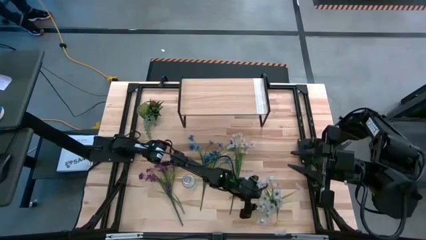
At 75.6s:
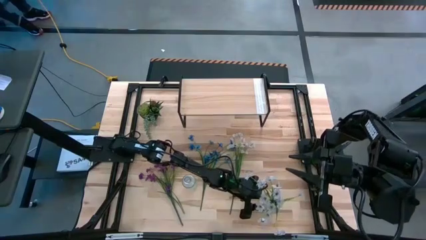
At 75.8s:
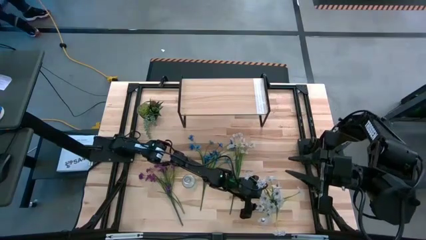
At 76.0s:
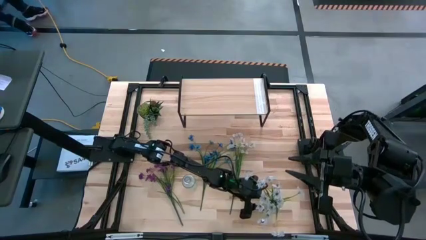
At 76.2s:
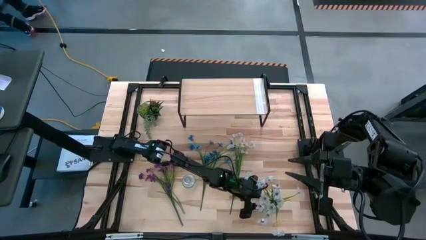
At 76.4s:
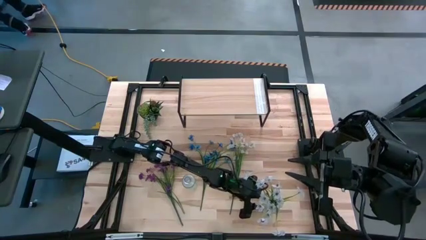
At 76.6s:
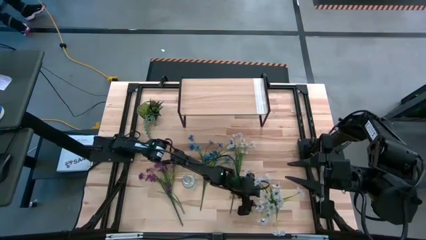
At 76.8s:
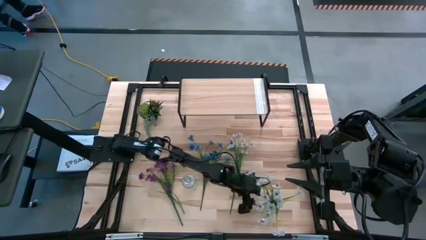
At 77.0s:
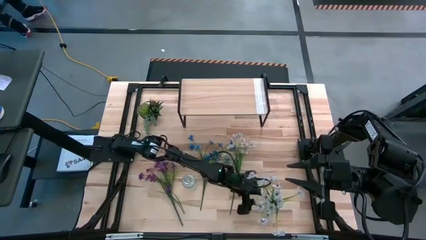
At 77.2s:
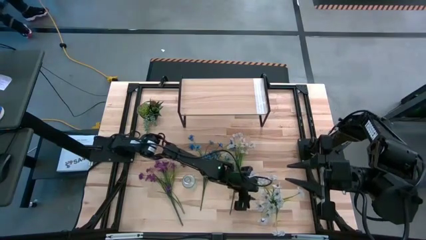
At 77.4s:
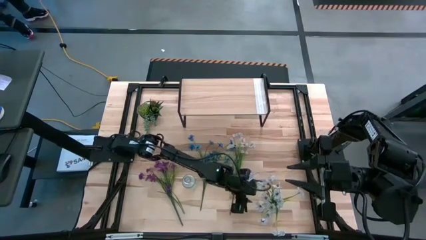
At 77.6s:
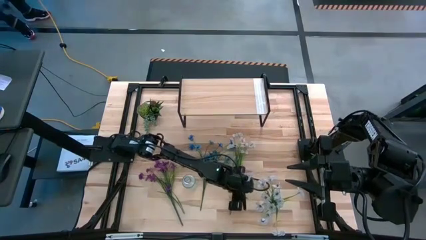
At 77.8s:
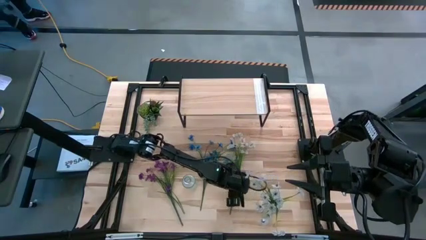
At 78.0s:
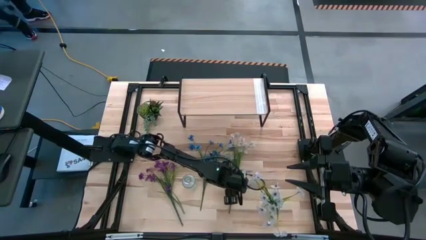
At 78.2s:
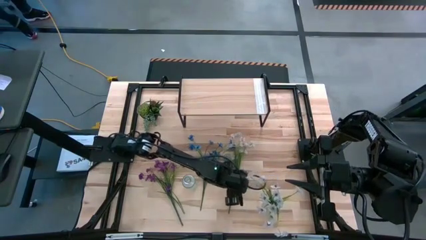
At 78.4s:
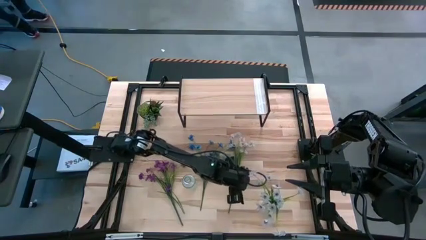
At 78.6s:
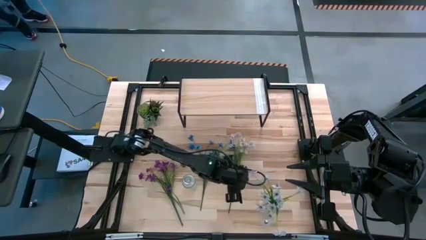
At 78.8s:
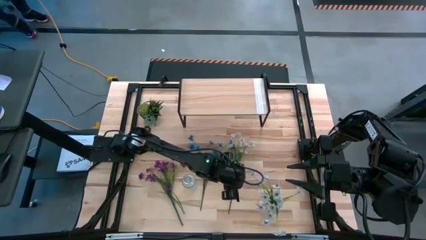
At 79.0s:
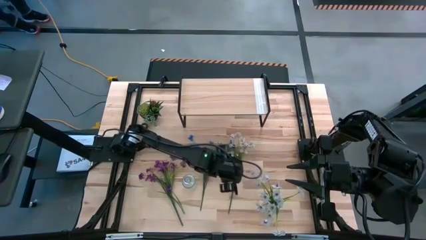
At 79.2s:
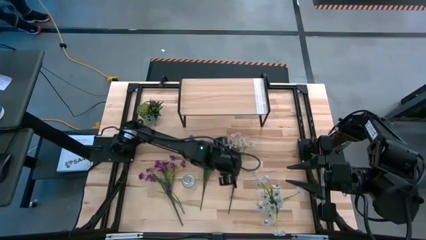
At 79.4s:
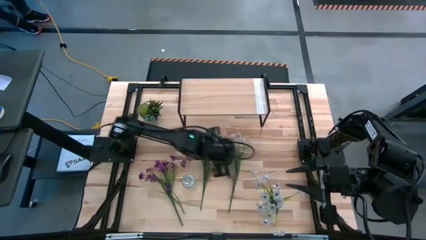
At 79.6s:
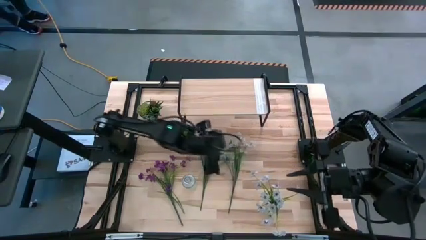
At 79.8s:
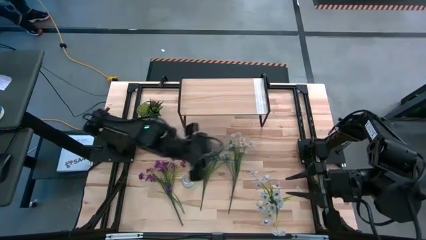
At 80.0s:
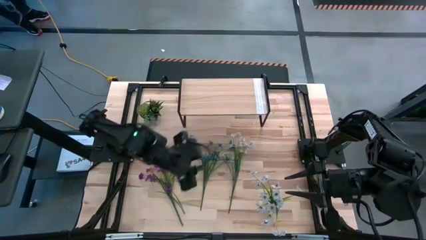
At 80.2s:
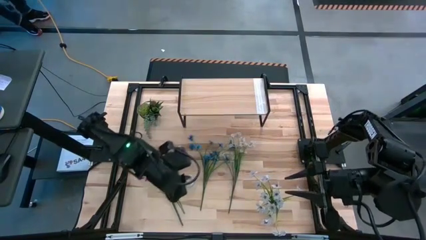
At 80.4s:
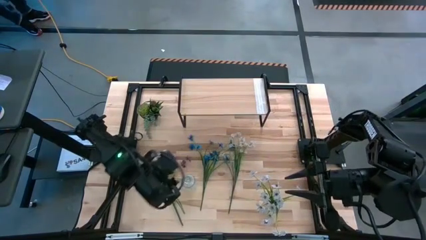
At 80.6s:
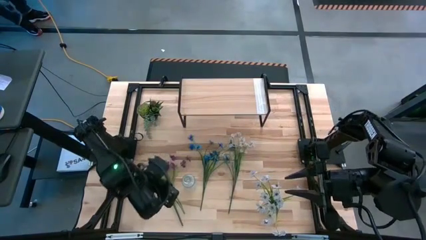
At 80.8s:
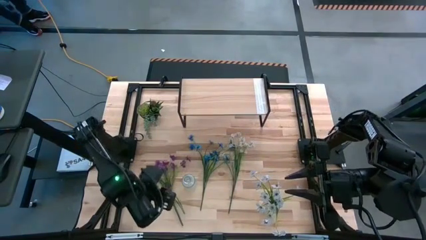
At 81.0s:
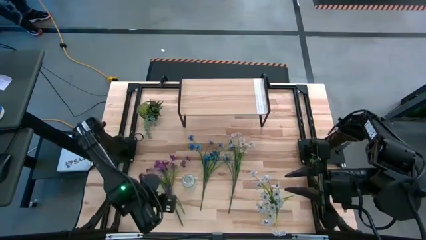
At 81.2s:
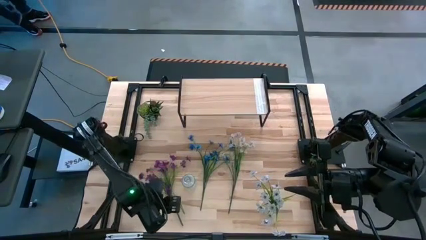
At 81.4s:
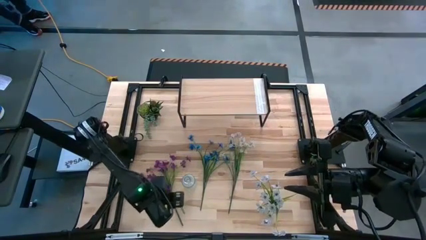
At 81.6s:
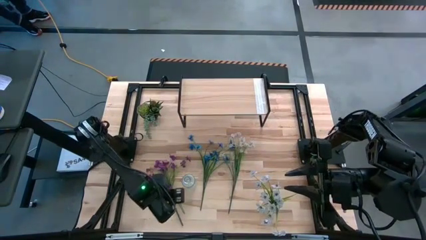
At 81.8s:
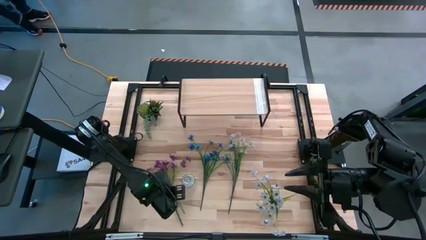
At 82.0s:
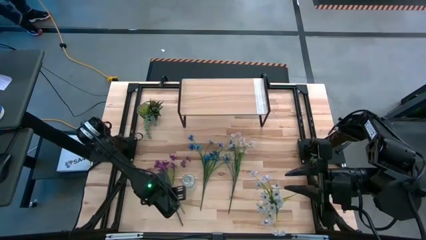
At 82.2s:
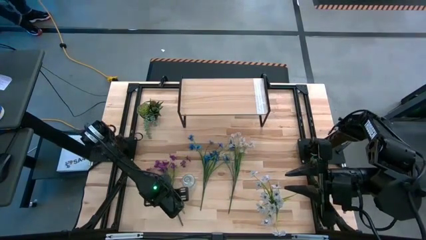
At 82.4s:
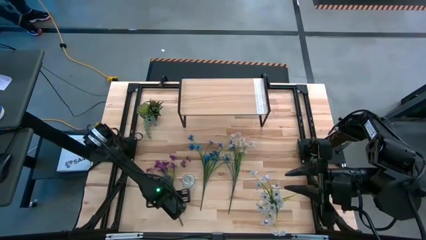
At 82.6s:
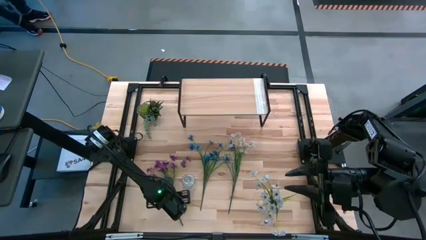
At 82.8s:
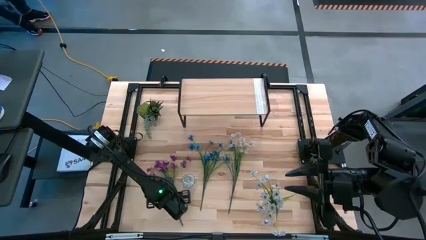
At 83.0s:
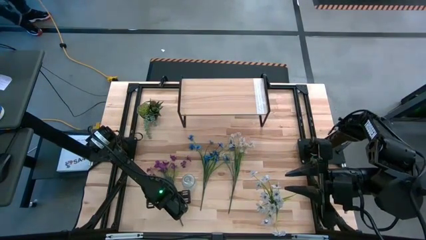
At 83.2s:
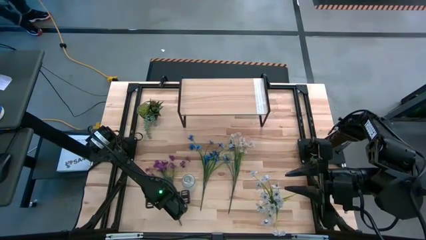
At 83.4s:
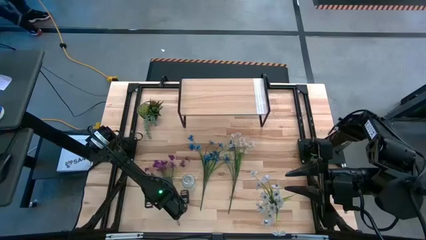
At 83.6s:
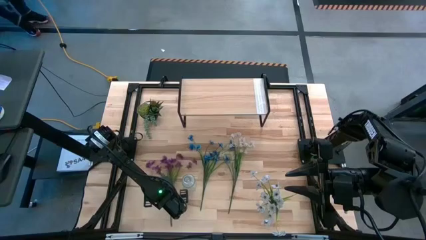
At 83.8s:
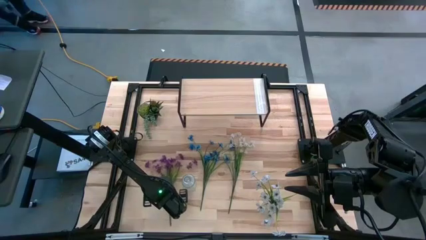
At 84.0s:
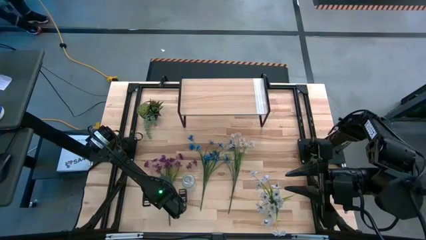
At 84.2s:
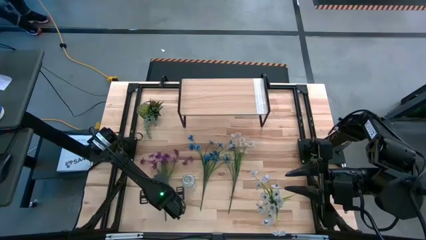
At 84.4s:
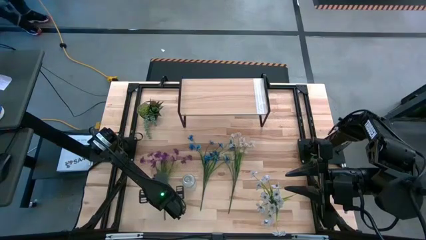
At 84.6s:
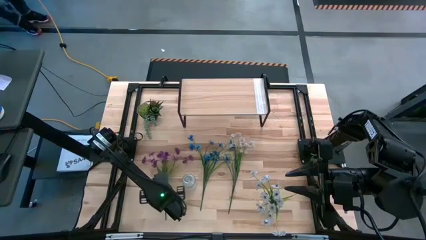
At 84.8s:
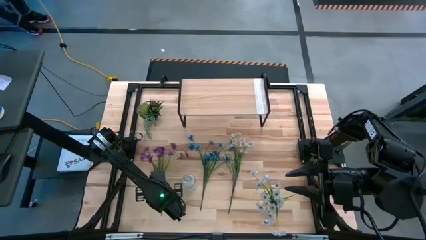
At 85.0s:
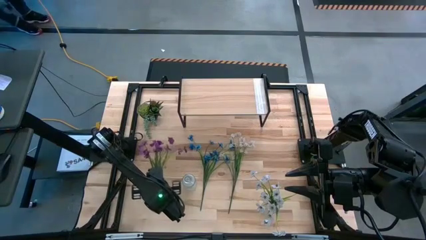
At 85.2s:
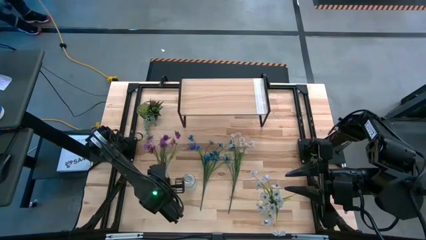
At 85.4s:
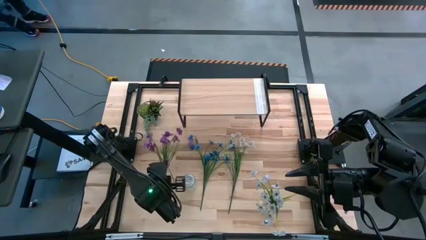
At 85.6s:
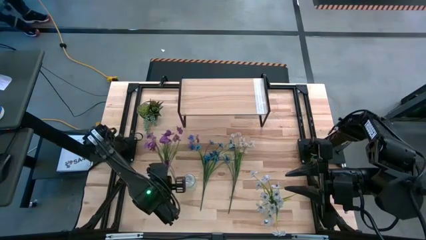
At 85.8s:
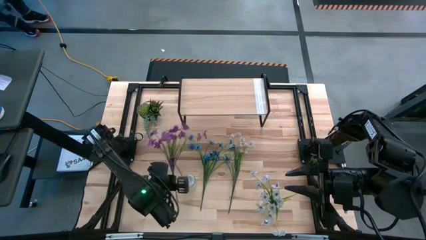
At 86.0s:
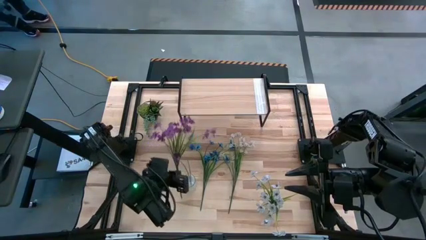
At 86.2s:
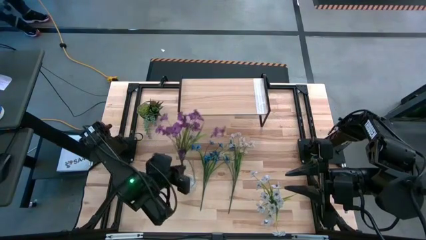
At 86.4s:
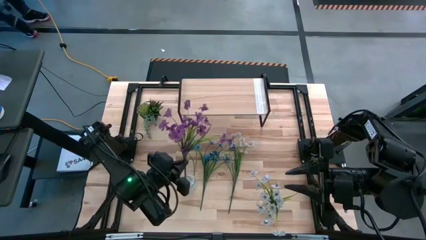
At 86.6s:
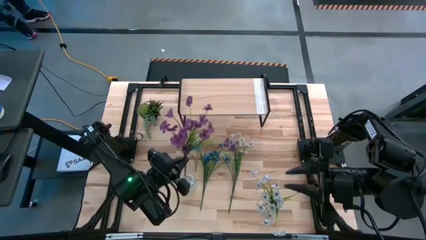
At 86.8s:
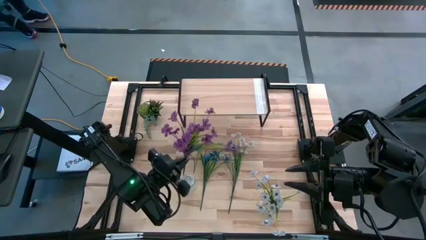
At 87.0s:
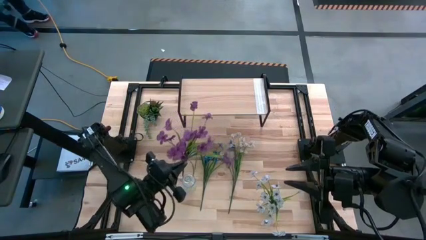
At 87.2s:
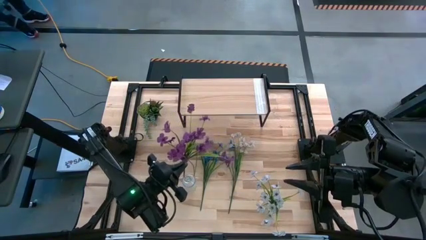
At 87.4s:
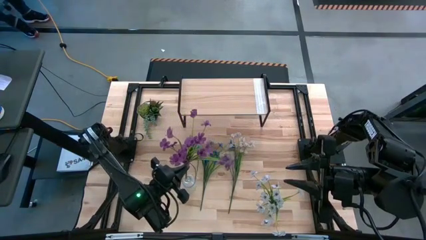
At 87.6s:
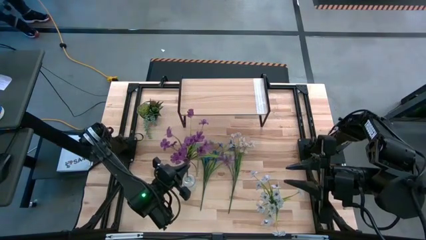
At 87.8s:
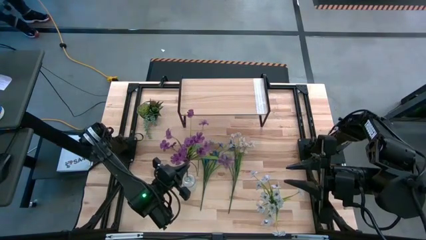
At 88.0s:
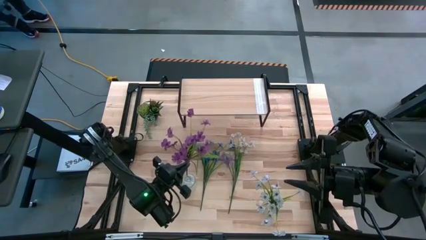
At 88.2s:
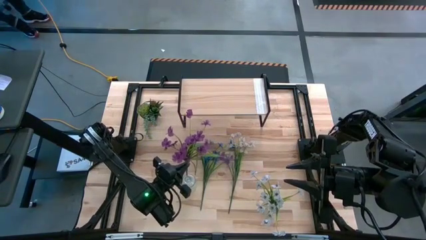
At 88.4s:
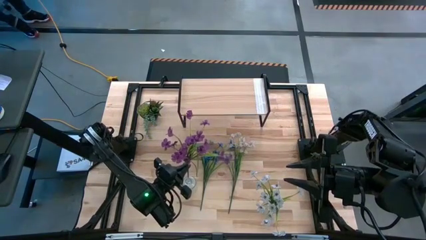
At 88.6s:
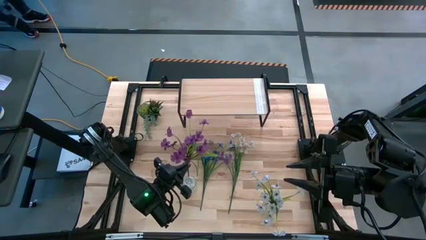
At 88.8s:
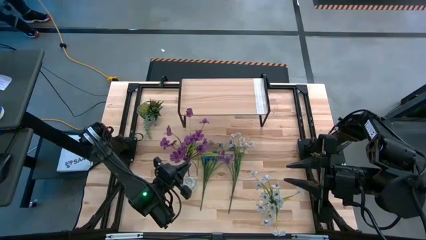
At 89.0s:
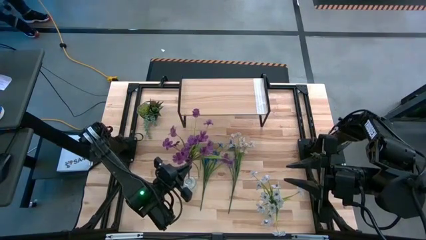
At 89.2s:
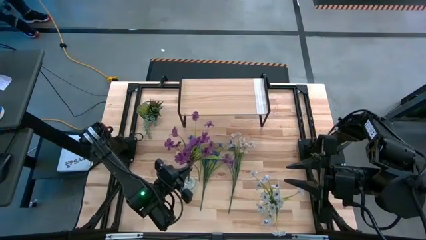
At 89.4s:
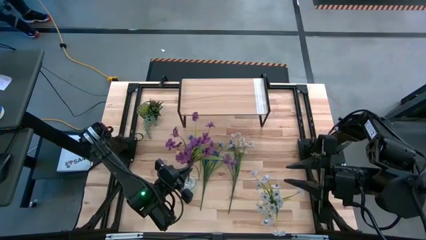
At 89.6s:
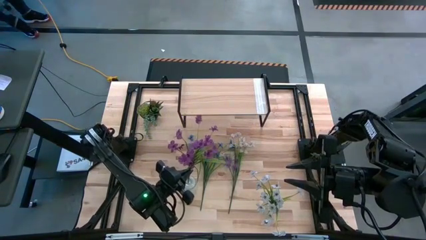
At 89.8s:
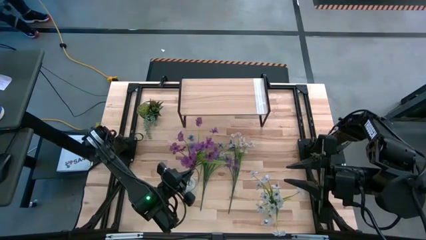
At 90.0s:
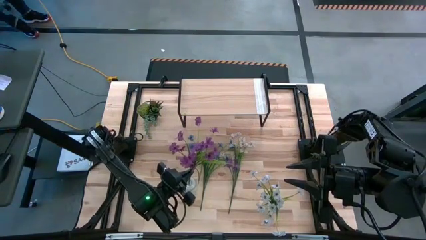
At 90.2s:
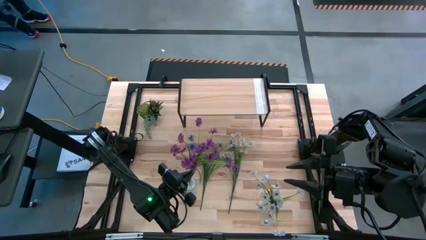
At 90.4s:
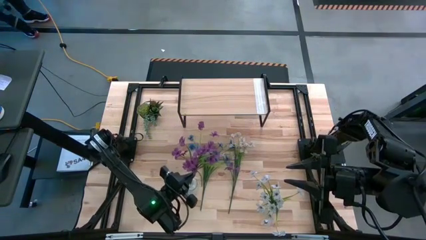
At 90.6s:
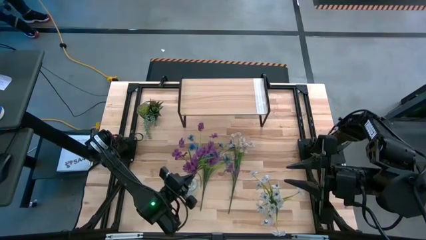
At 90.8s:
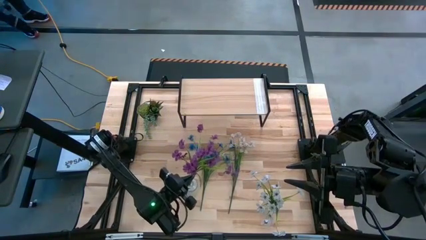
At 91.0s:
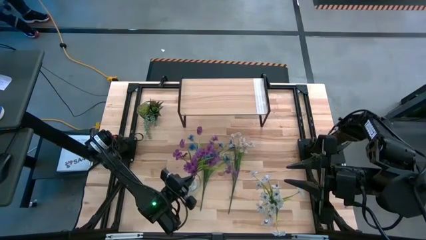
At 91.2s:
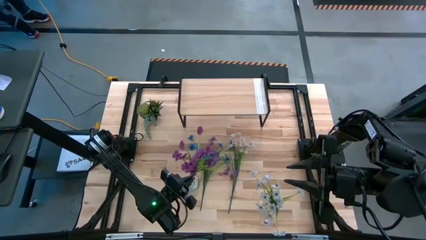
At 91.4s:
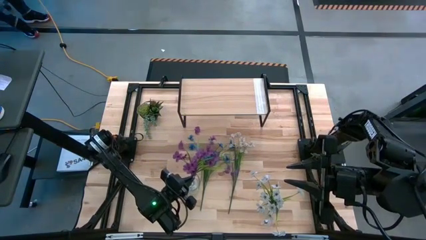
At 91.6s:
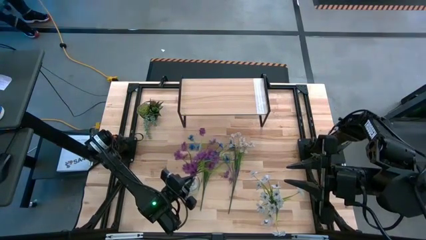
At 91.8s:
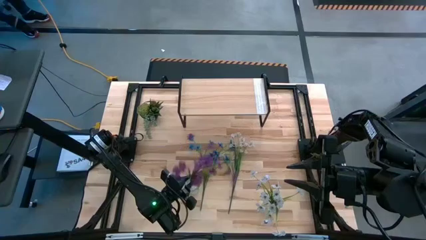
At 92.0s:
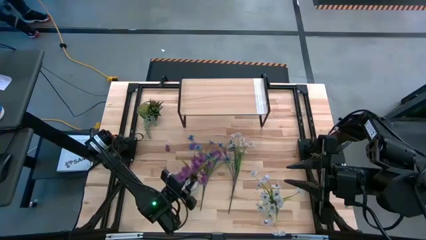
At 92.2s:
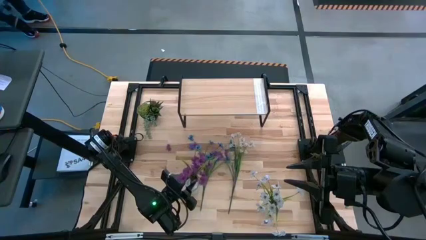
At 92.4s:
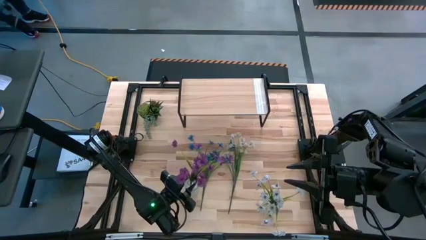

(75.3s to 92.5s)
Task: Pick and place flowers into a vace then onto a shelf
Put the purple flowers into the left transparent vase
